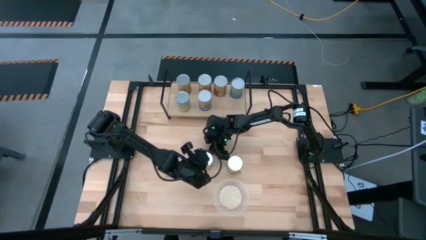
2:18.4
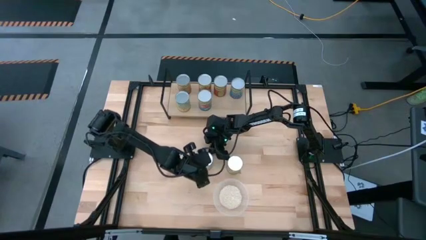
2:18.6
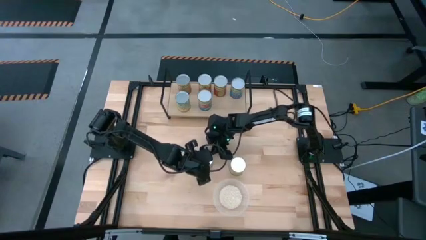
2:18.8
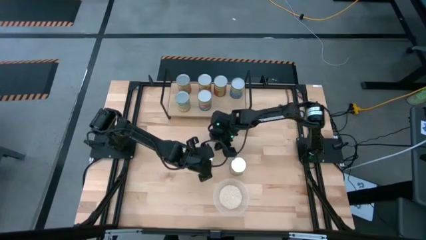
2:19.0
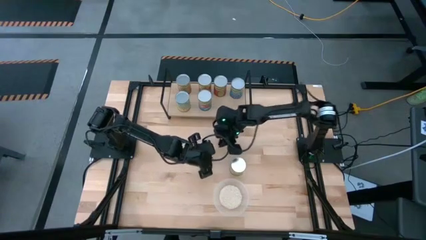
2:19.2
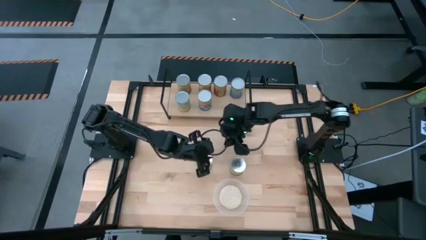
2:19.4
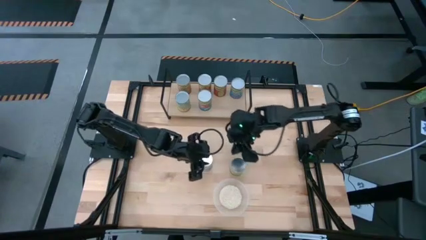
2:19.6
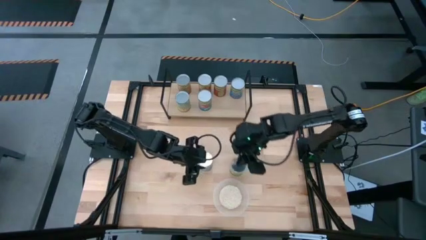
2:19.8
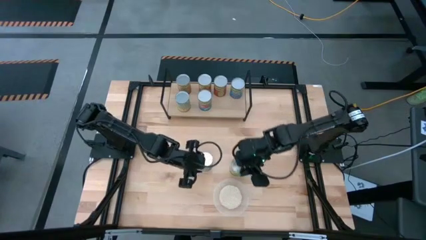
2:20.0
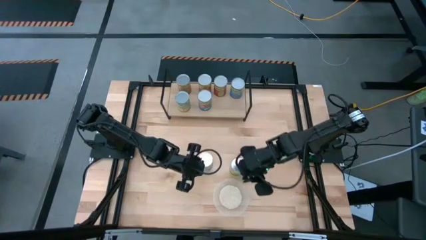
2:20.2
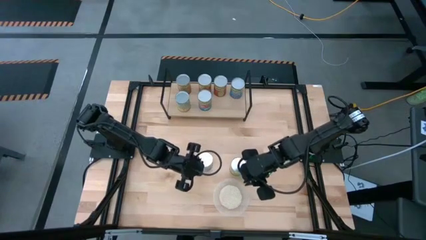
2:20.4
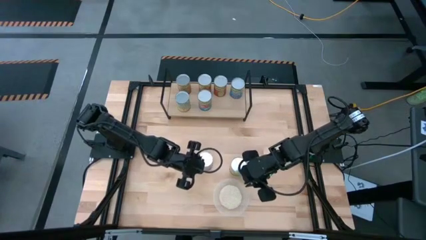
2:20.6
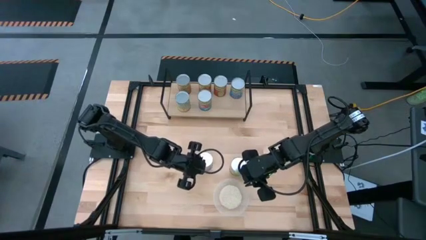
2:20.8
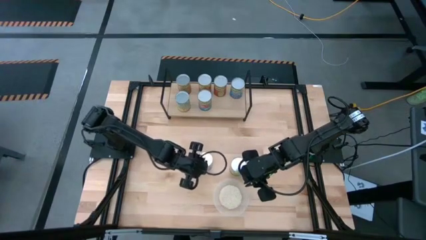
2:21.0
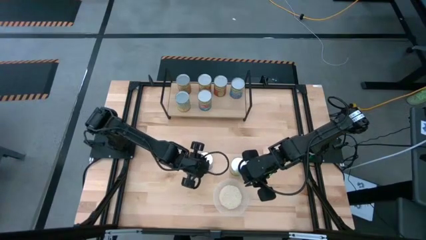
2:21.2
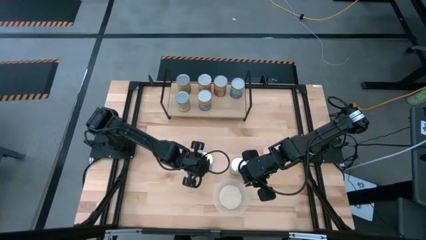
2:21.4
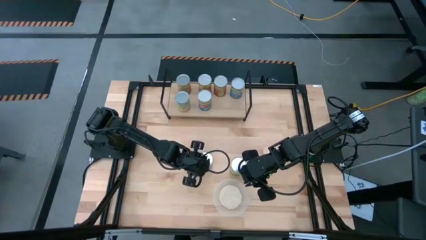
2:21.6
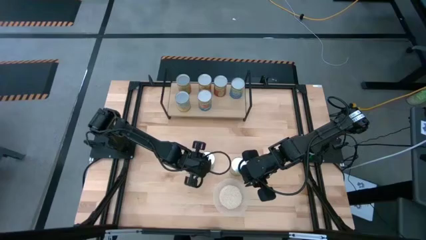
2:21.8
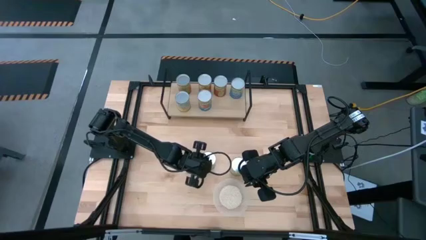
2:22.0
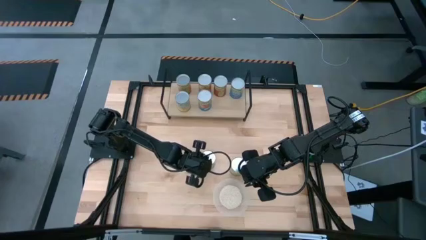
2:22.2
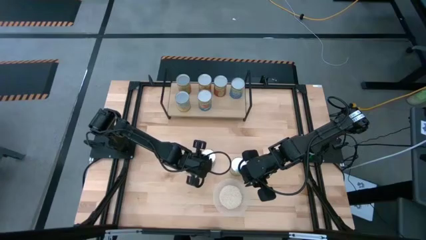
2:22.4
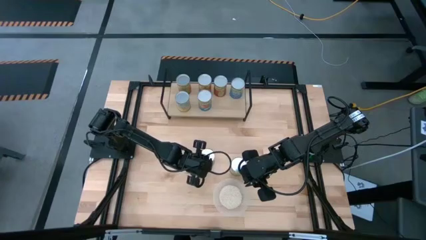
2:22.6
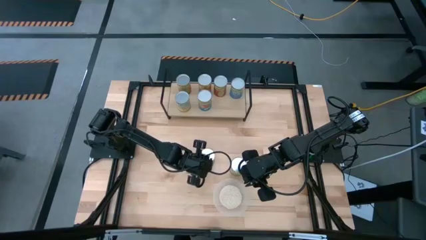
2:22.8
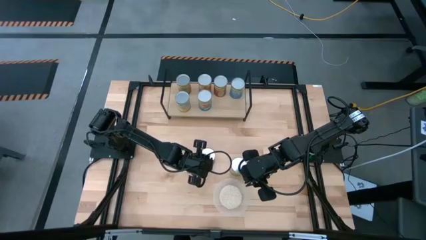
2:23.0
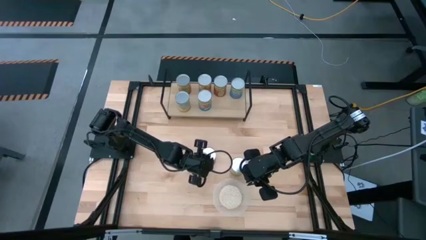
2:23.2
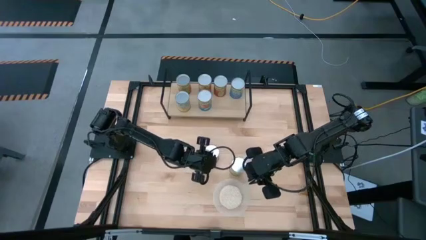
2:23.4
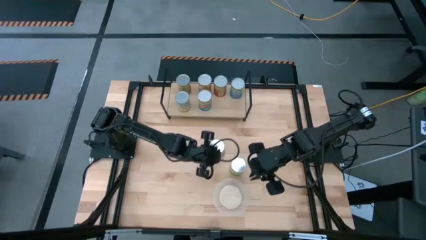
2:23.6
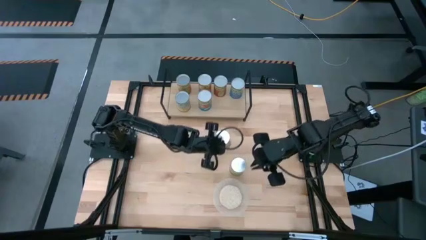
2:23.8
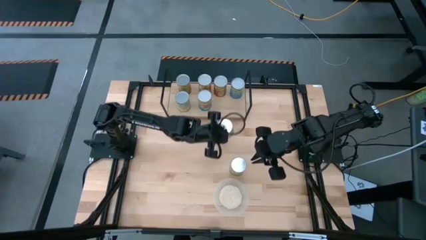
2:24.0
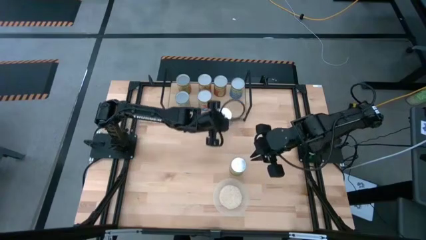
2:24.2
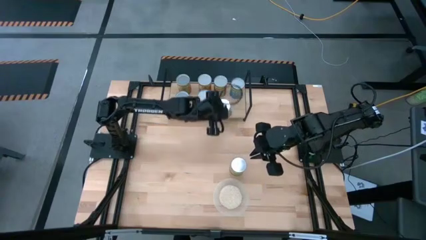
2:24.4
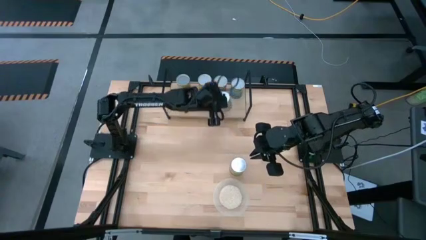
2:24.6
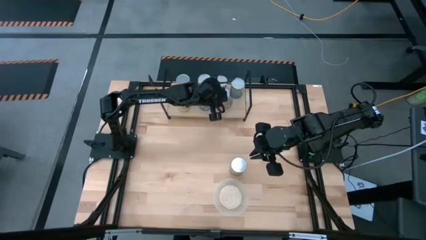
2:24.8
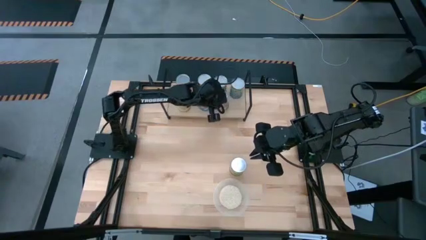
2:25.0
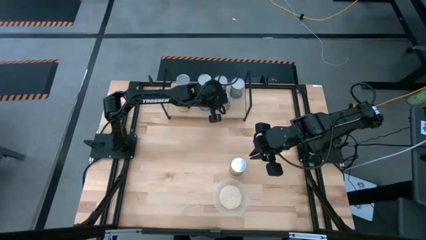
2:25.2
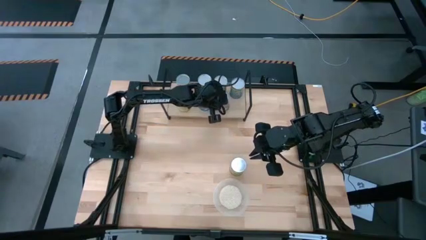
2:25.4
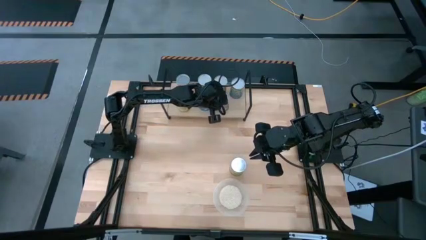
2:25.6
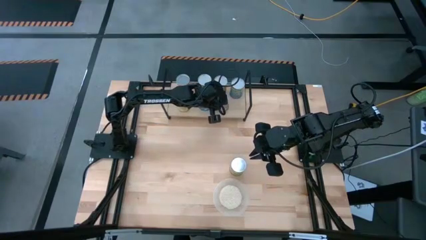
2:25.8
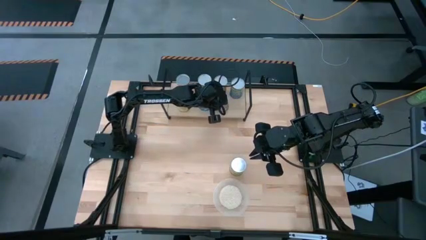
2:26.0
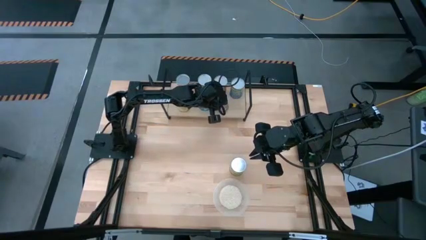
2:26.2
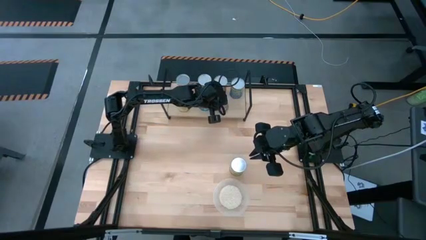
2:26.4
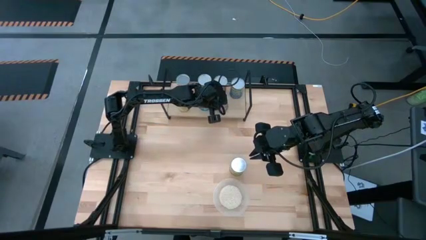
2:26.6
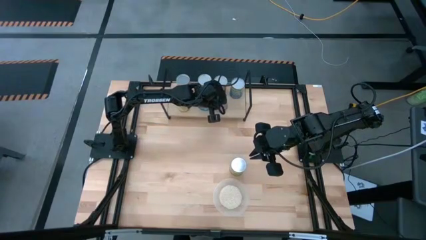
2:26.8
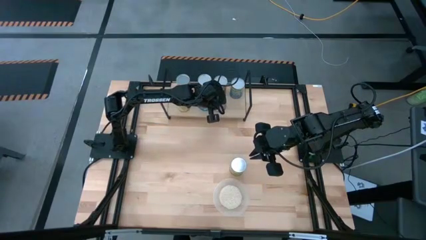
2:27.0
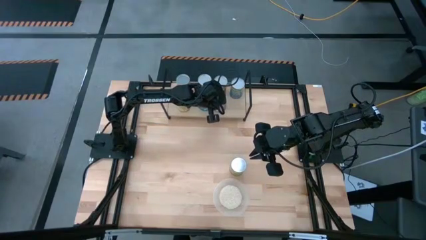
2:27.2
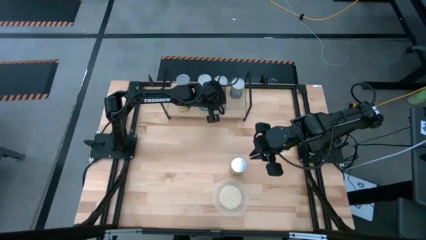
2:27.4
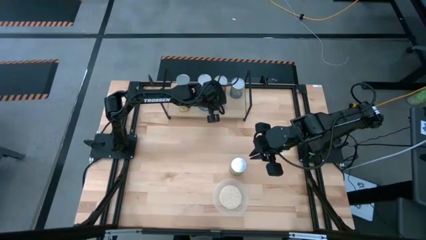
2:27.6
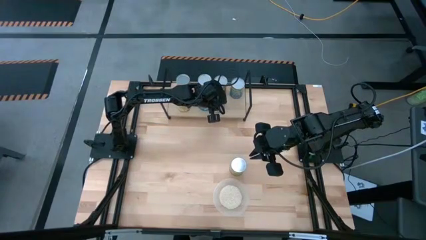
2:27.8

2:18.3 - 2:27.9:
Task: Pick and place cans onto a shelf
Put the canned peaches on the shelf

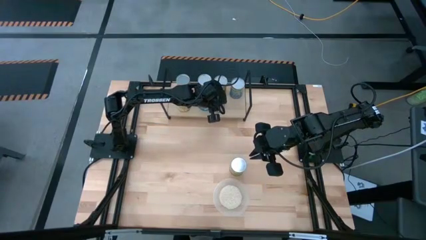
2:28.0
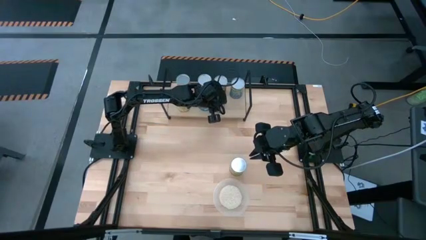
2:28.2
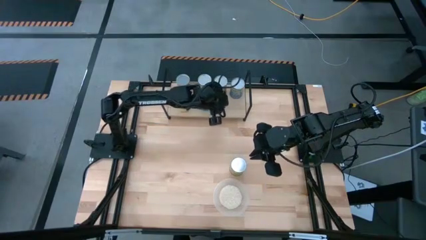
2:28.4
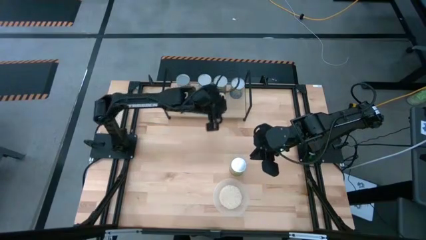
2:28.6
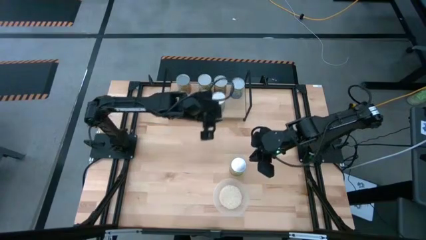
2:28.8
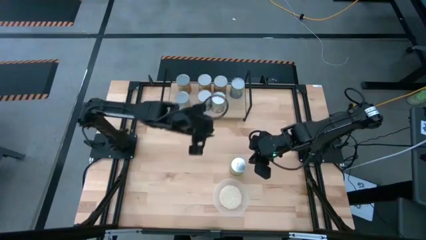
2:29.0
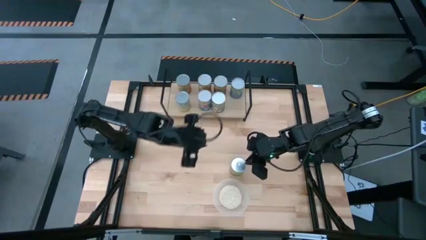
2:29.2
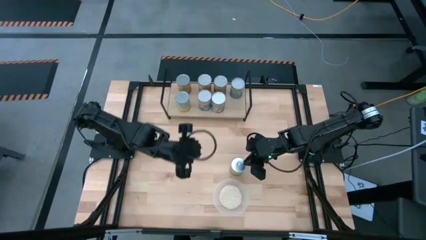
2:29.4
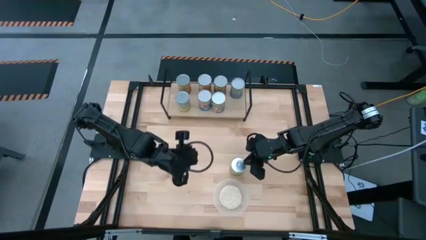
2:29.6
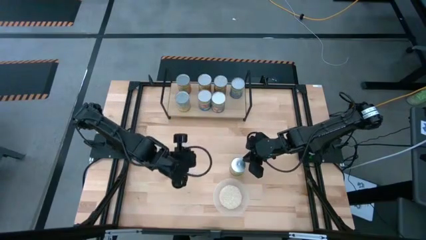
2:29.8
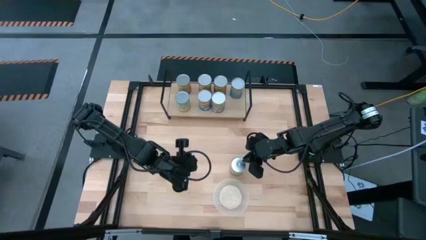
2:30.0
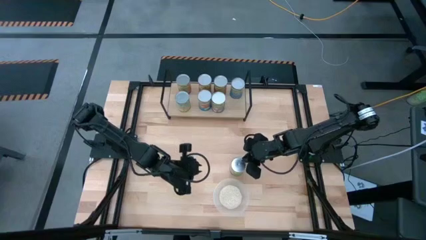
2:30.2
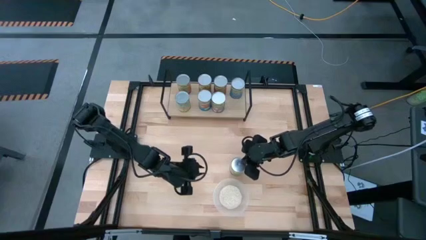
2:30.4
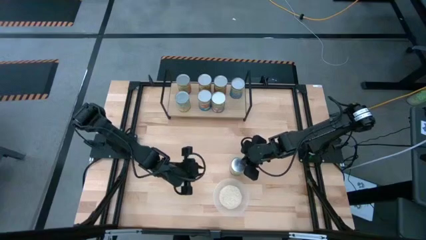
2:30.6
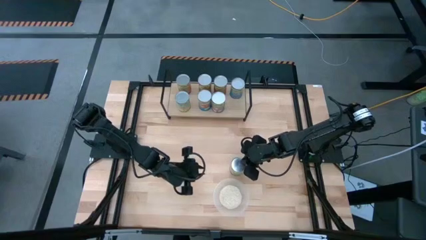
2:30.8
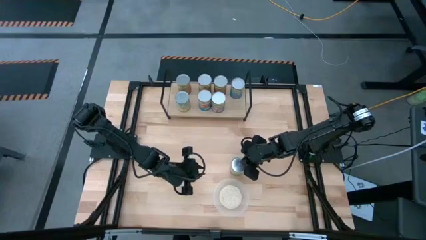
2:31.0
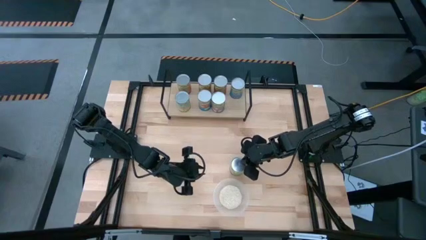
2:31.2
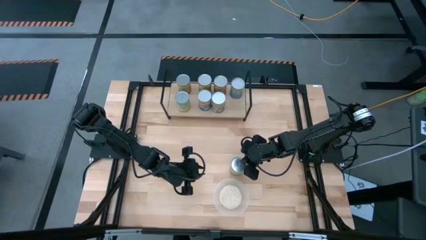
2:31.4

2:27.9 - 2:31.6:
Put the canned oranges on the shelf

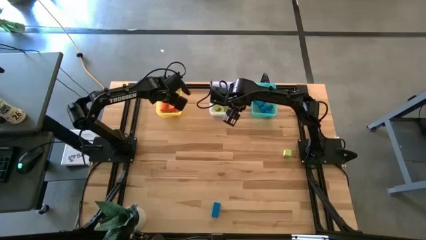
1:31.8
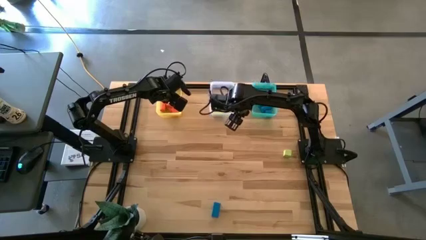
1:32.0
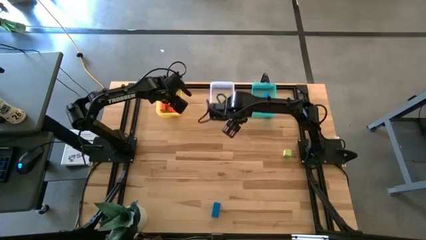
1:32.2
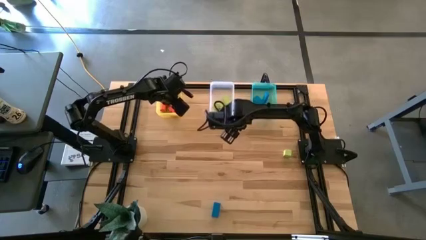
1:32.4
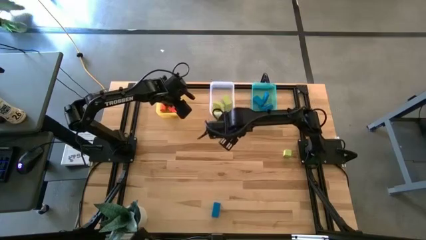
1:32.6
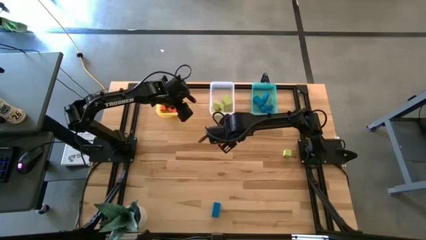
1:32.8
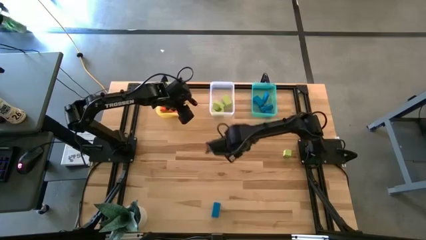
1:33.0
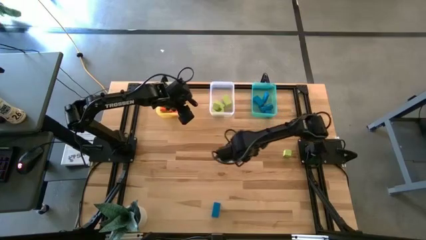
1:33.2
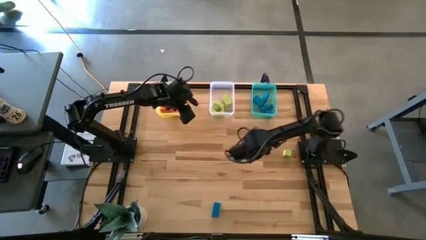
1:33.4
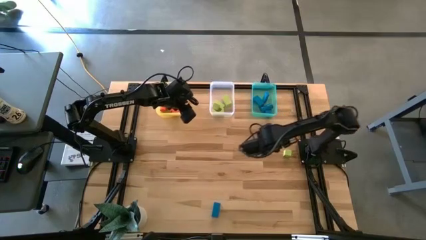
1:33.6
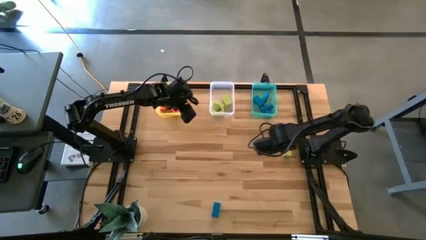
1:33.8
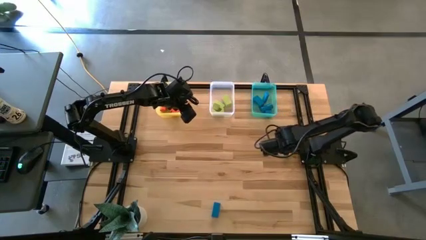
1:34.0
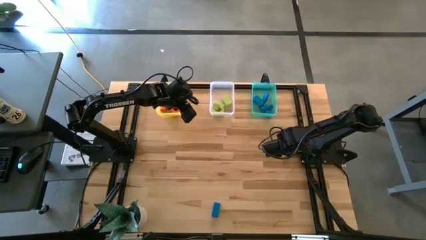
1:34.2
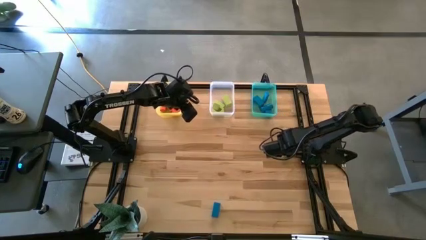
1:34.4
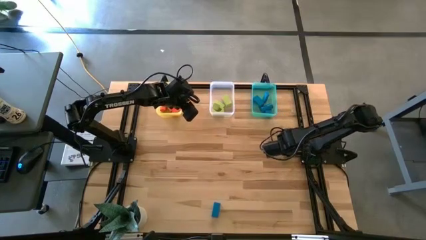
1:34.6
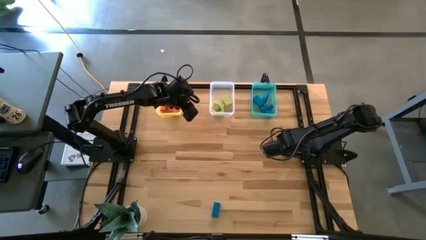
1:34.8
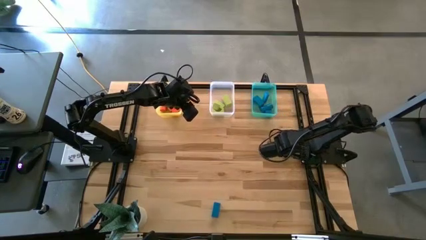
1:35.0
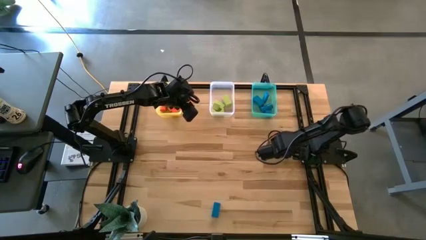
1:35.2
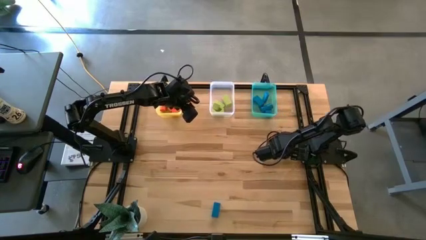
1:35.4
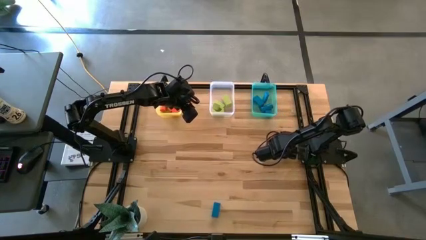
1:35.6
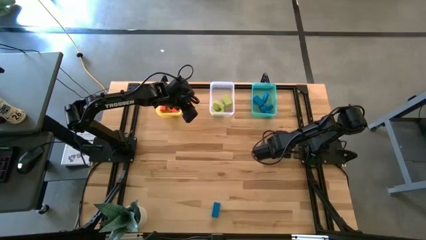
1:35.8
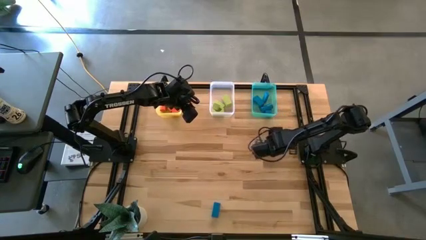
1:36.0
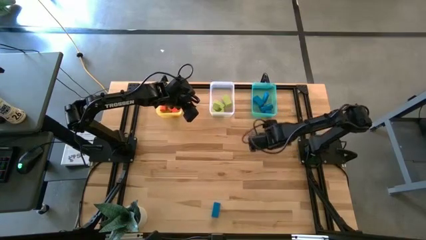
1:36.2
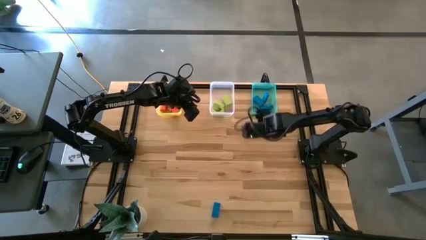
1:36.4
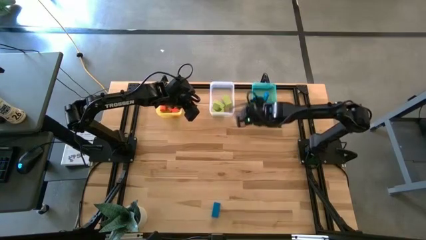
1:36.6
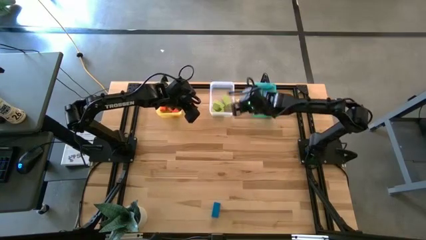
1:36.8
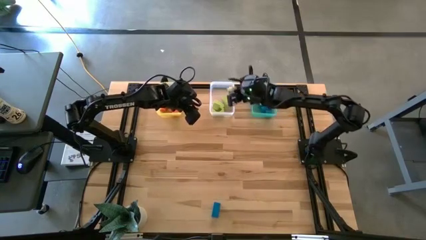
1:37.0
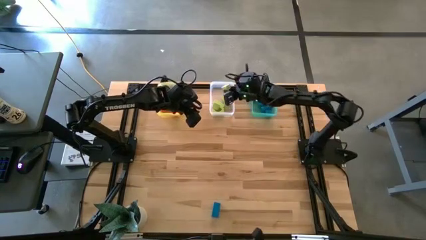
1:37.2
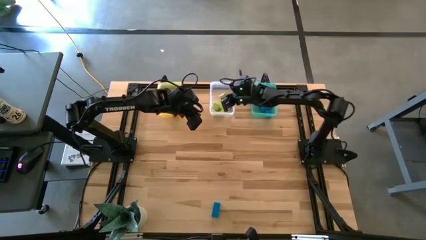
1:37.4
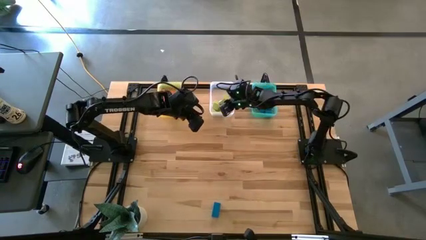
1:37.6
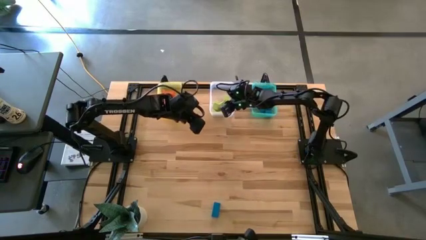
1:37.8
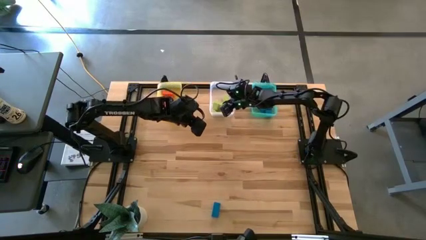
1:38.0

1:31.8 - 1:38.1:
Task: Sort & place blocks by color
Put the green block into the transparent bin
